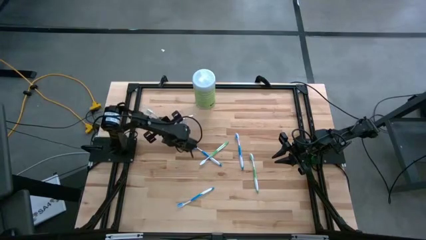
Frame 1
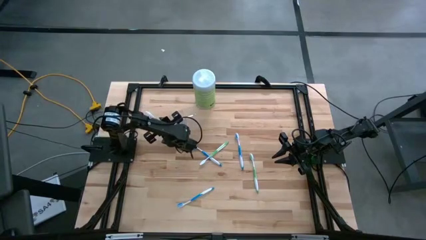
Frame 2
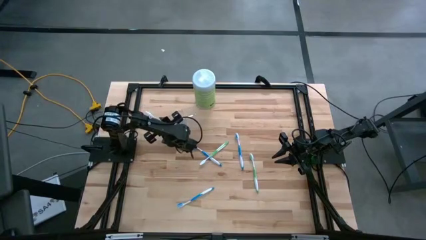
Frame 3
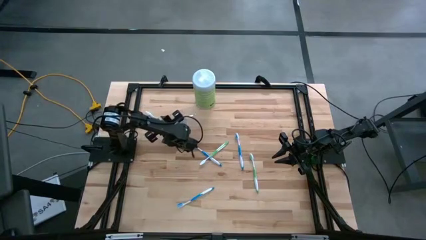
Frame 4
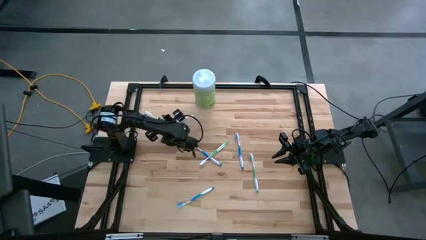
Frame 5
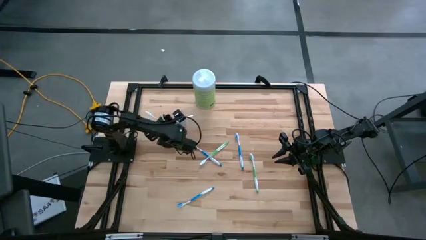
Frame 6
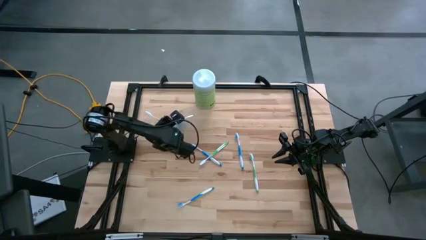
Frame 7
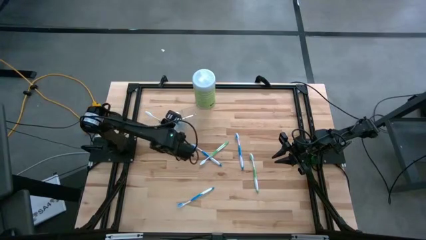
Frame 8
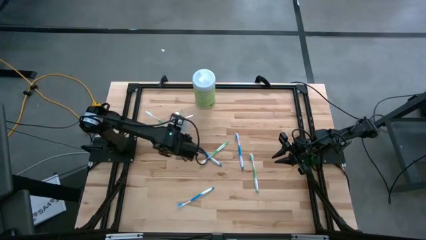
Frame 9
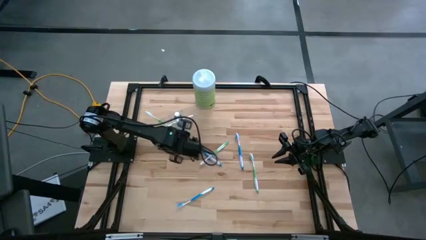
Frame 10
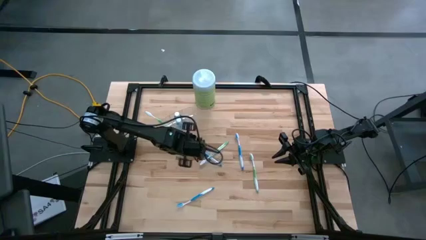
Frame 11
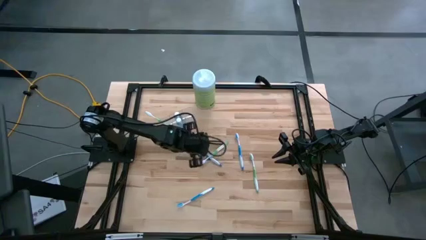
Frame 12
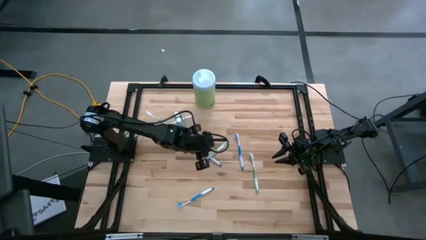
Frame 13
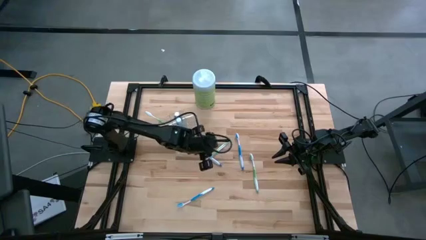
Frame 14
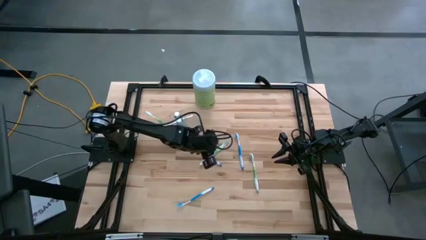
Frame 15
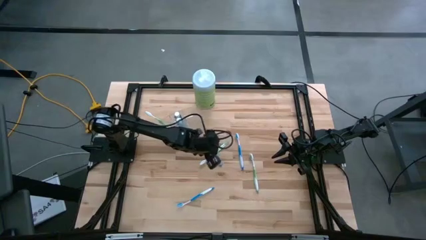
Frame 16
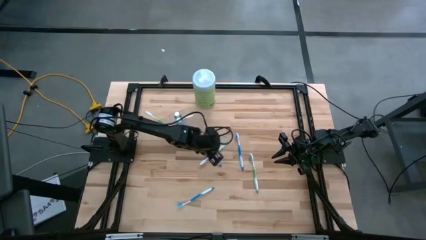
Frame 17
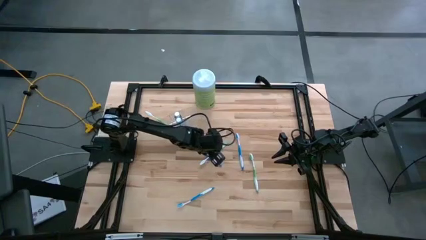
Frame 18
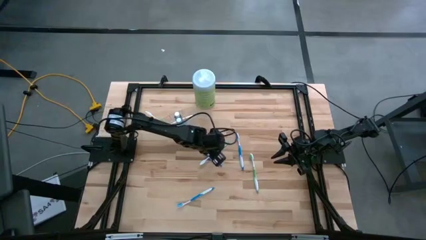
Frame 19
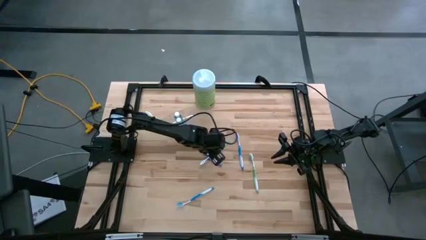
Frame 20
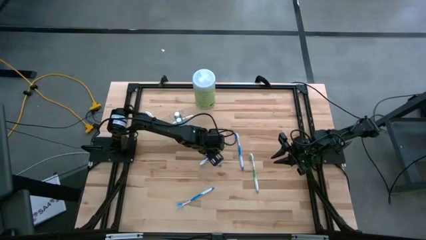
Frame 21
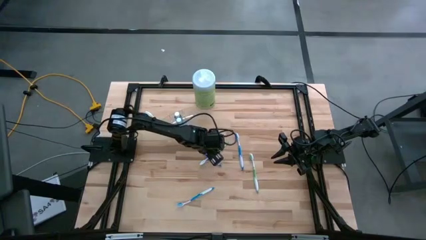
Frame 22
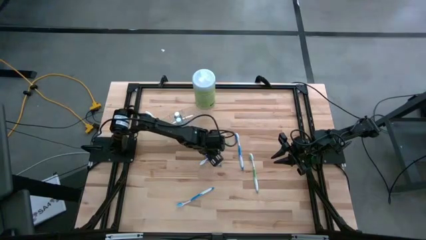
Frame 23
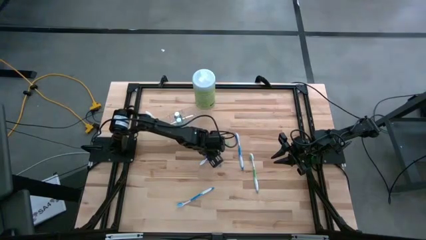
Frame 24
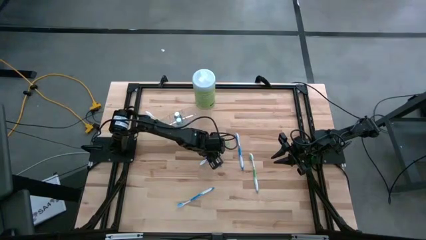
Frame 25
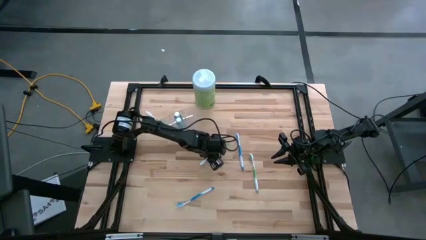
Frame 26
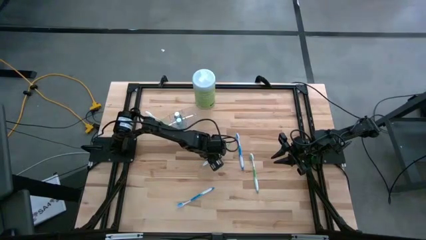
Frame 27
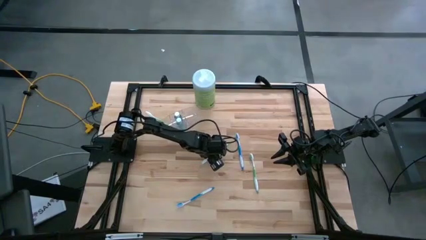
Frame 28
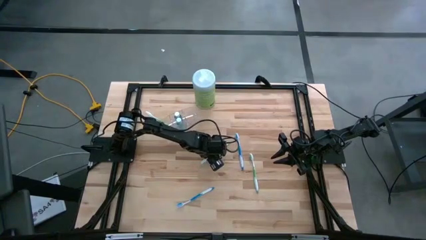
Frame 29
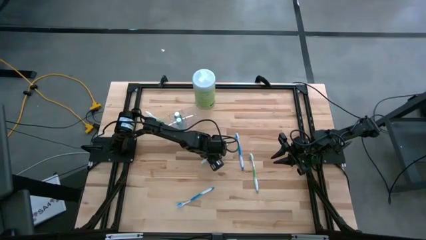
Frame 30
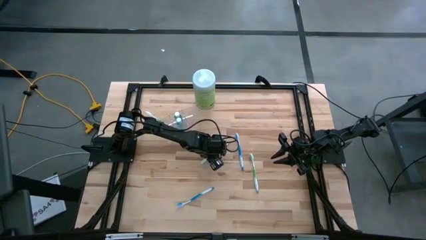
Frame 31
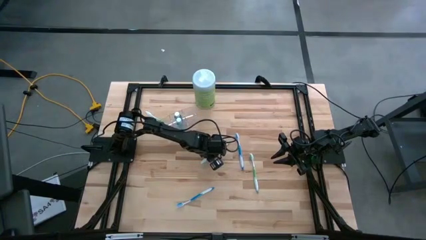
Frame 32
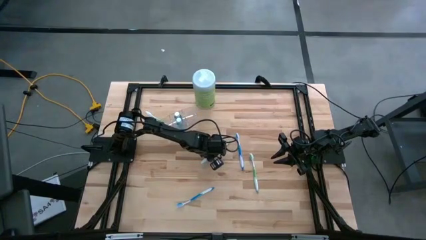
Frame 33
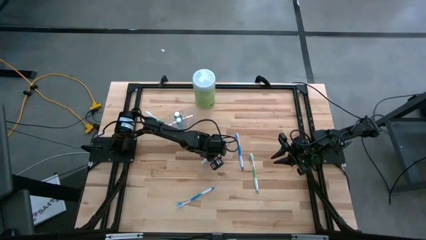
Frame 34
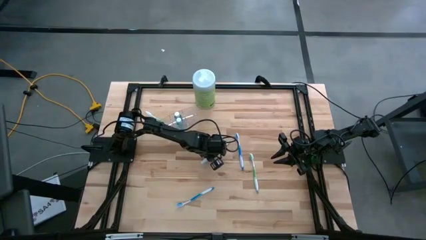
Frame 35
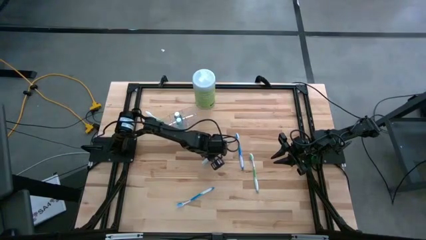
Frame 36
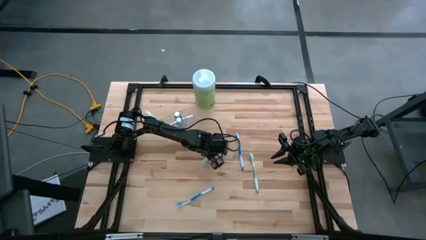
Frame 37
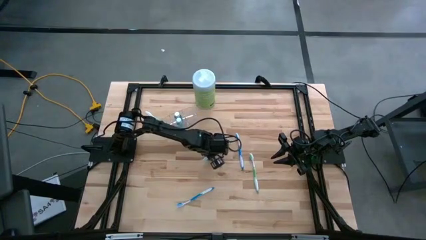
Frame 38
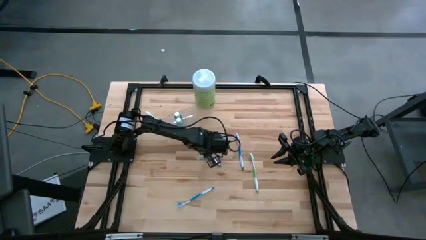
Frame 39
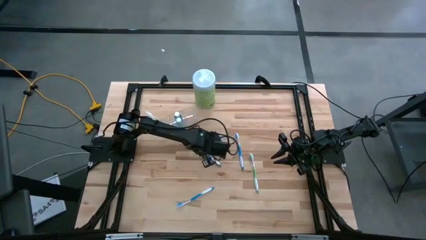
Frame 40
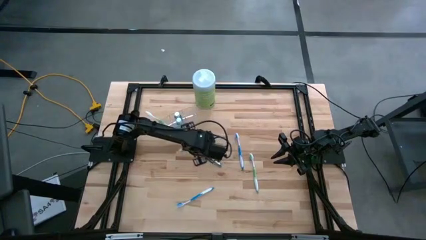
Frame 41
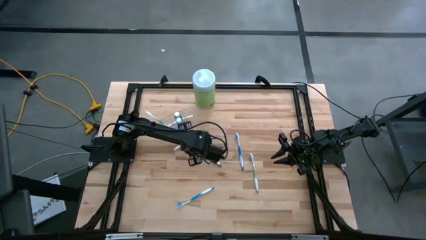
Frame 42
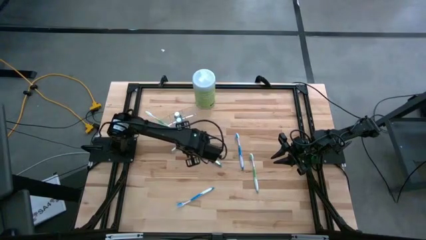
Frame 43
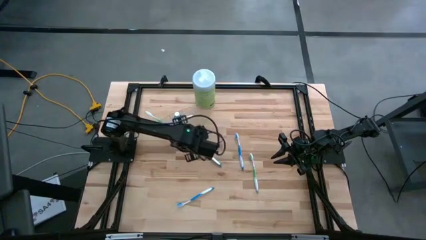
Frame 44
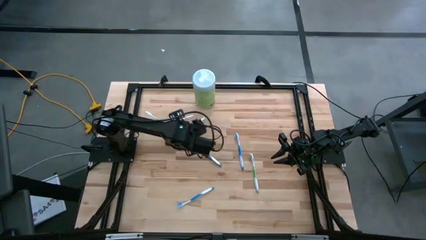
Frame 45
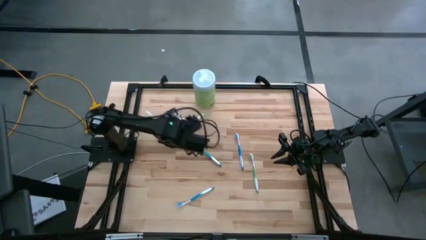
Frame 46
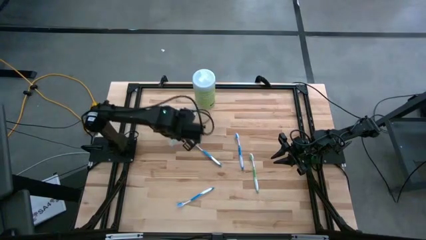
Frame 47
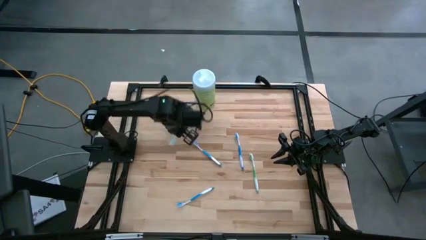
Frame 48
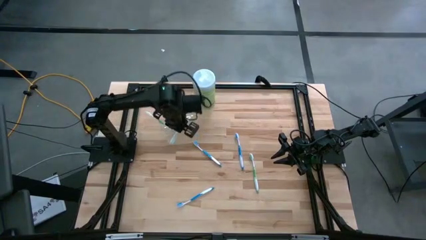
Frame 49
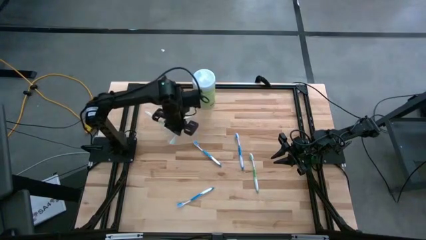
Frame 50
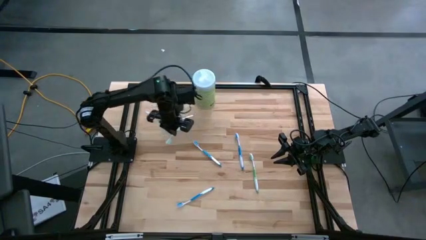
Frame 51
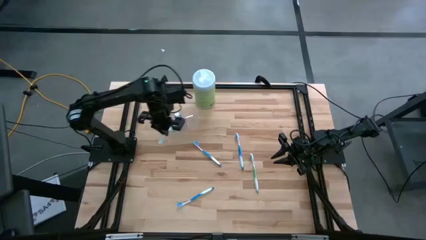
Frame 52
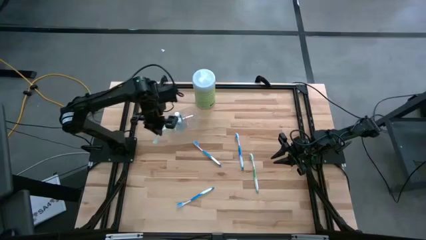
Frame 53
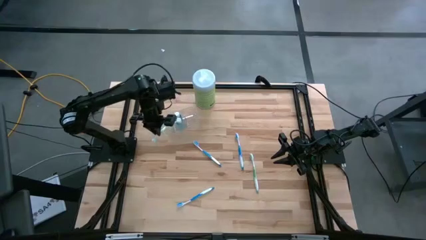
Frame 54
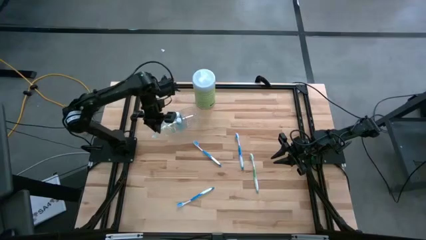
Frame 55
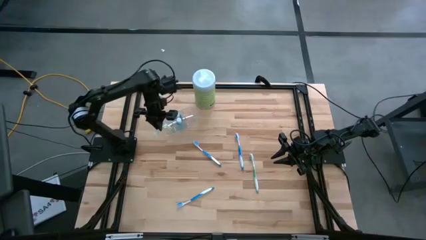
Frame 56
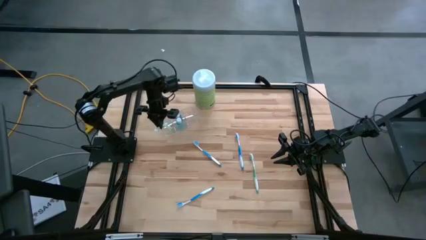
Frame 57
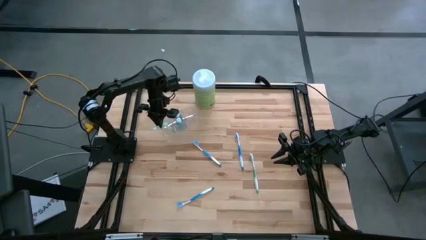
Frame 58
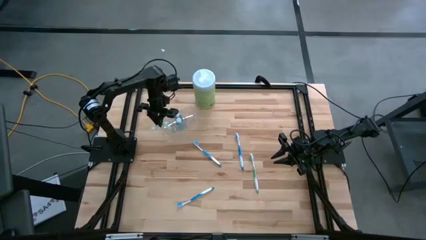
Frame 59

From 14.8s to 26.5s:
Task: Pick & Place toothbrushing station
Put the green toothbrush into the transparent organizer
